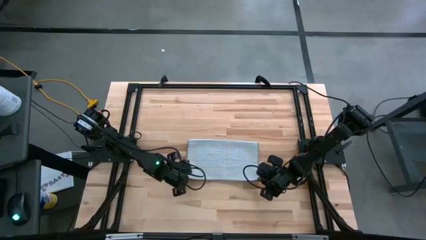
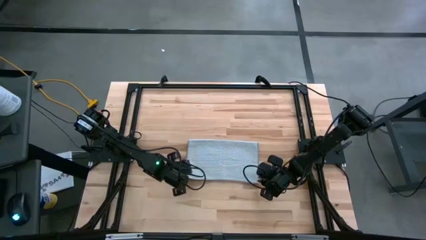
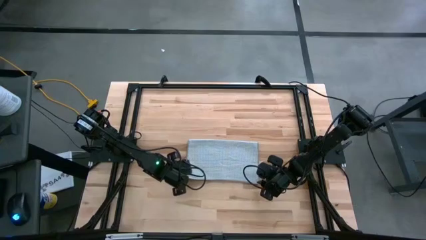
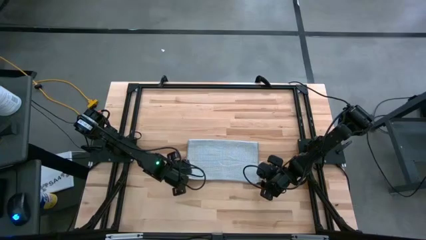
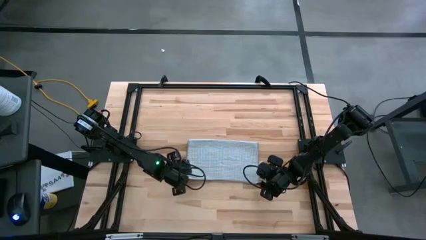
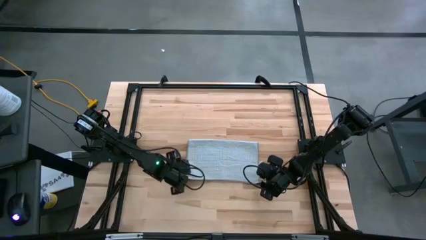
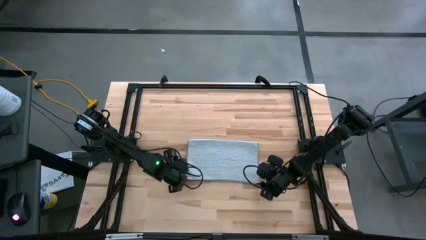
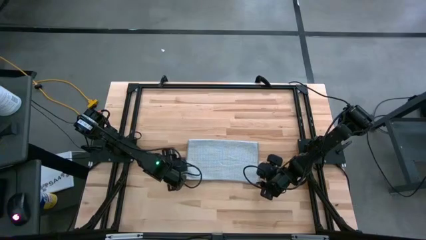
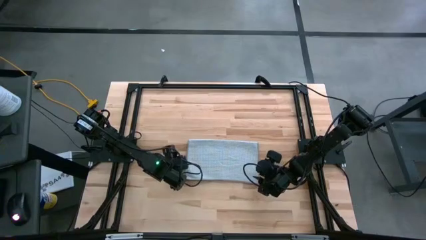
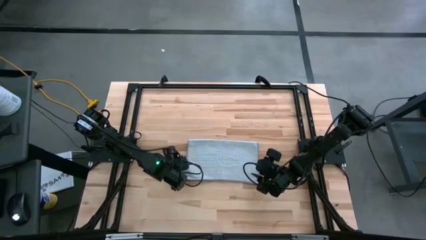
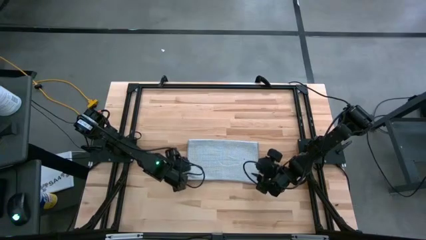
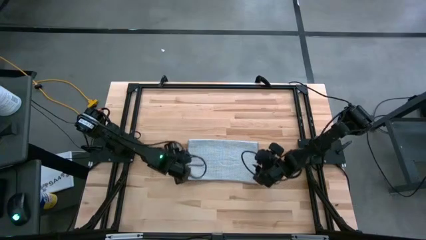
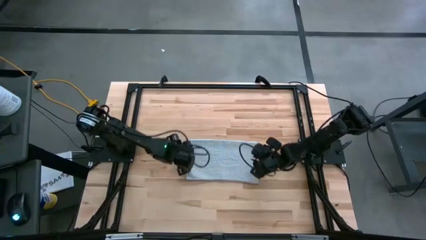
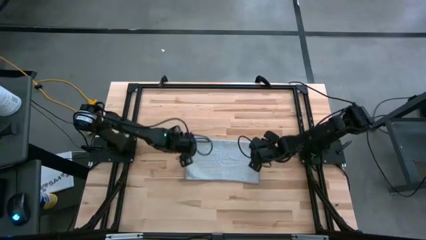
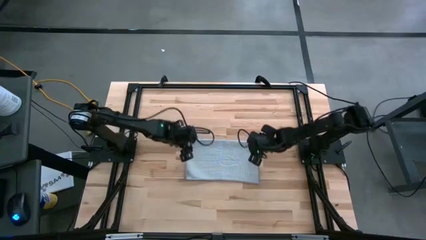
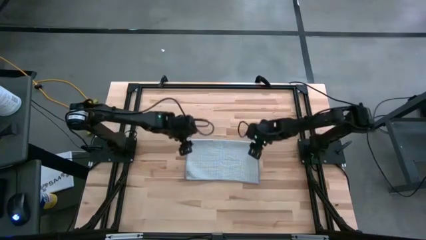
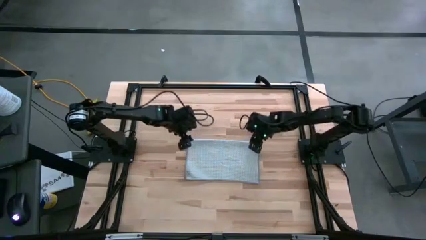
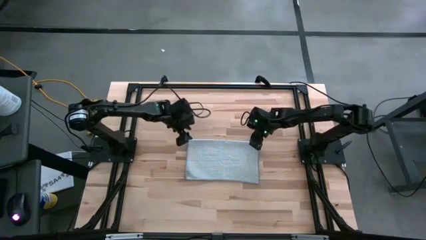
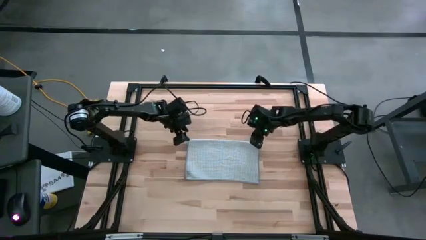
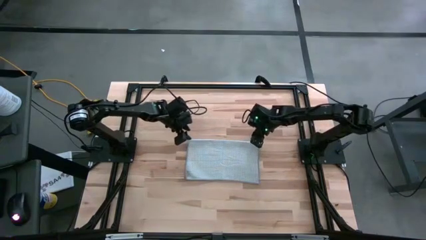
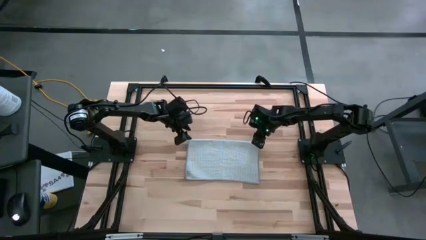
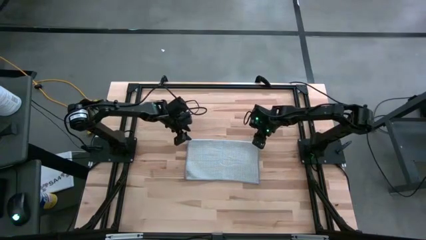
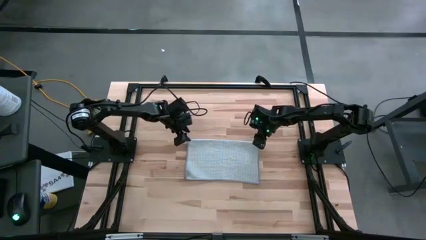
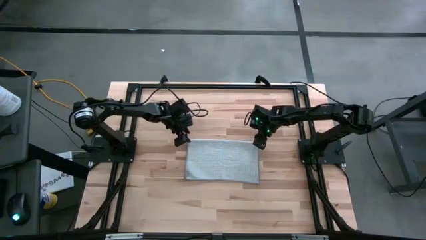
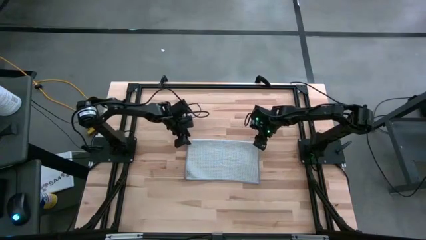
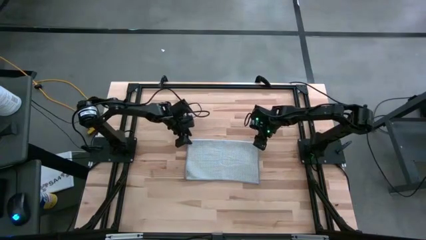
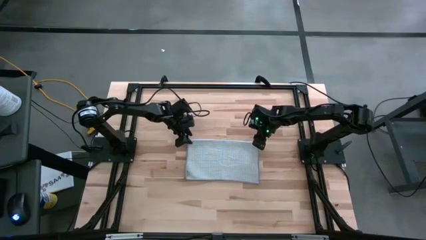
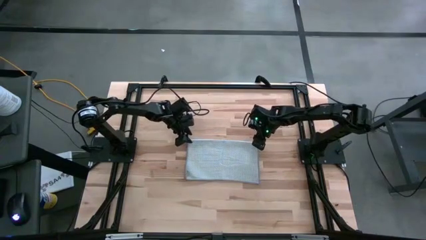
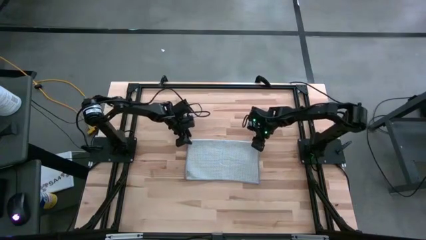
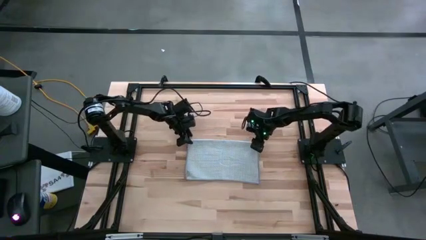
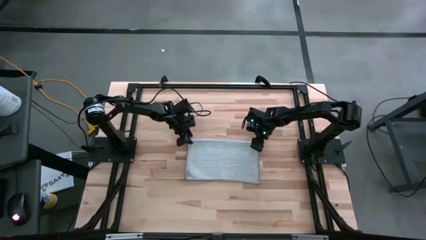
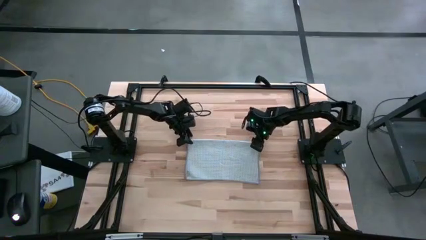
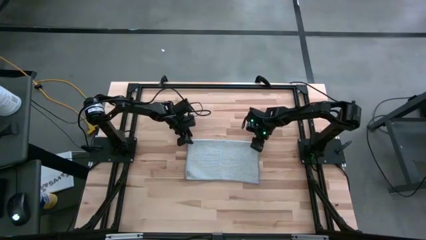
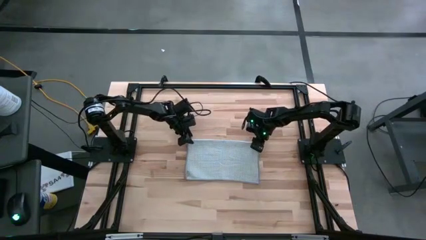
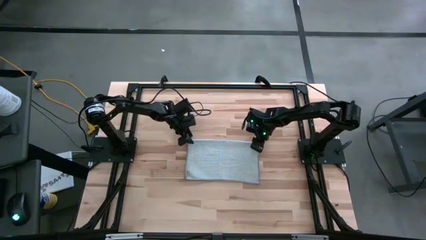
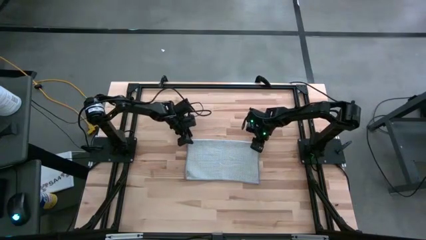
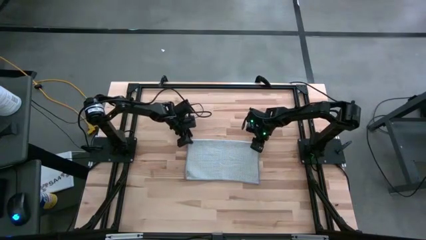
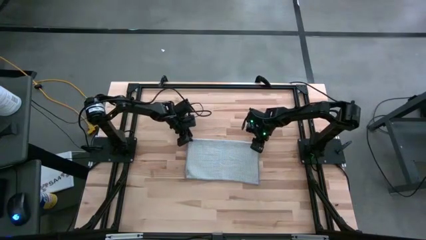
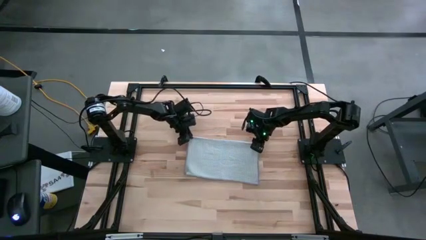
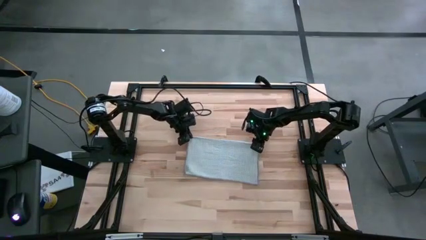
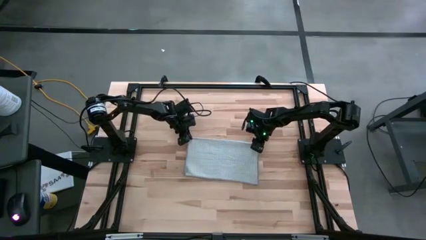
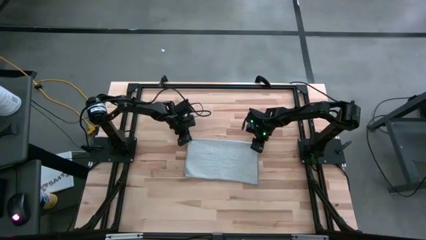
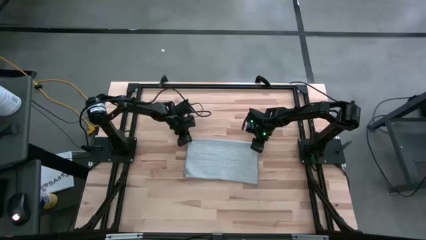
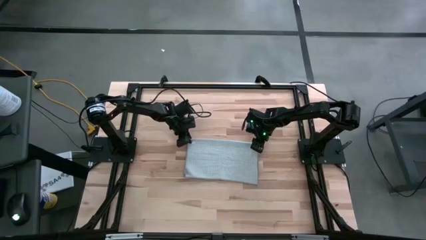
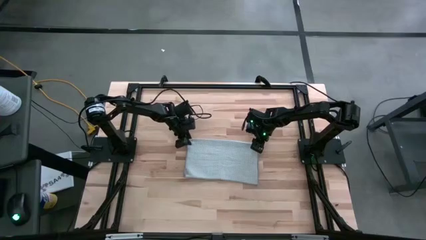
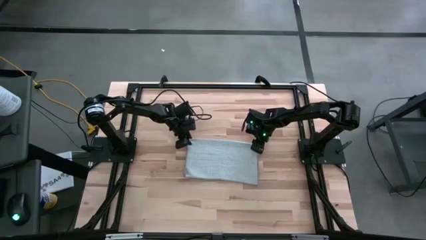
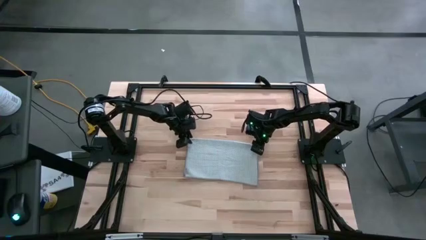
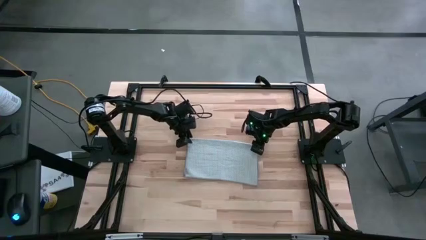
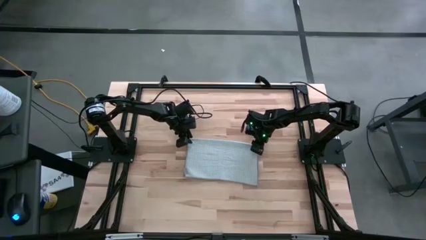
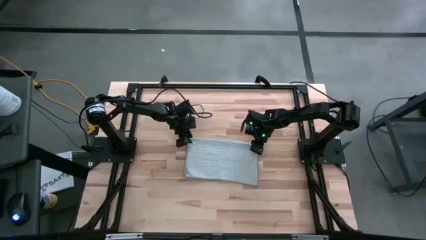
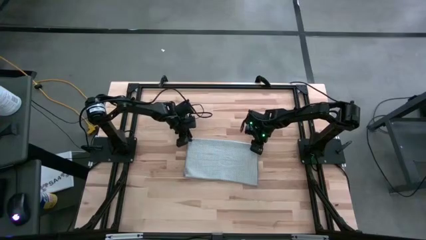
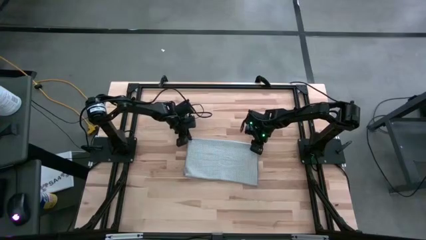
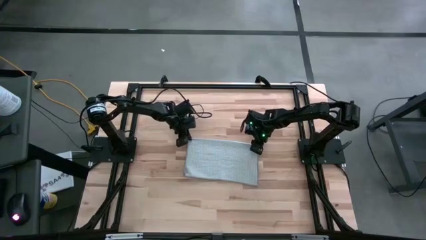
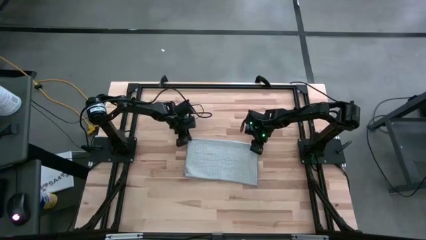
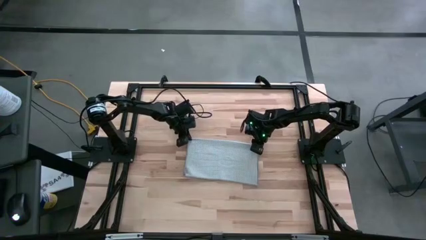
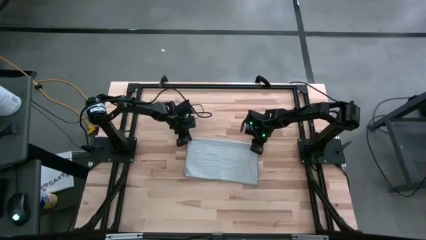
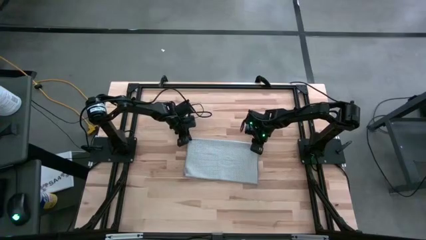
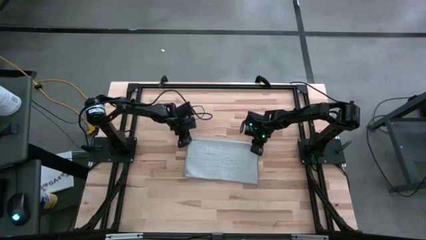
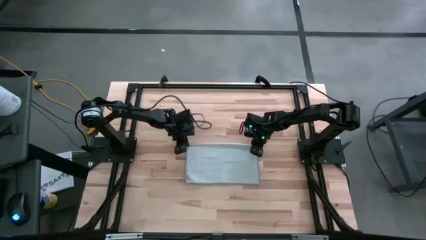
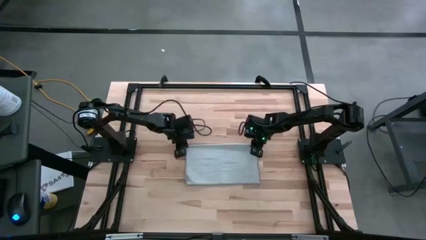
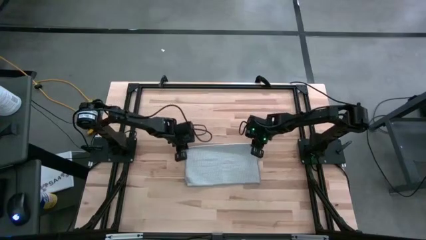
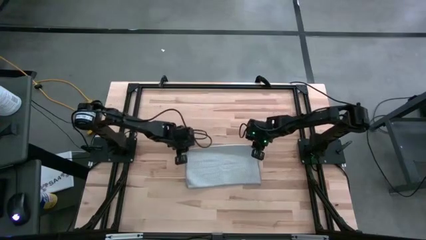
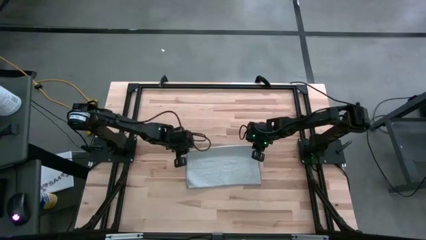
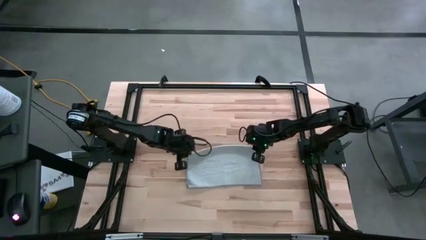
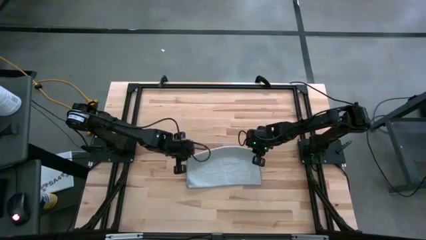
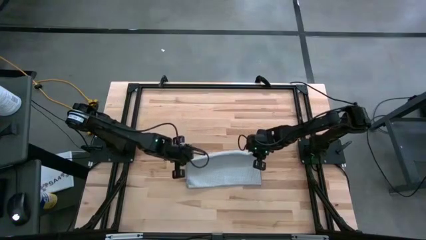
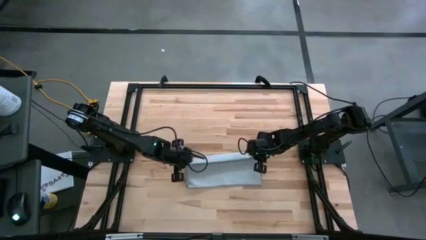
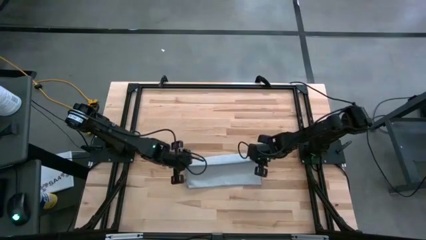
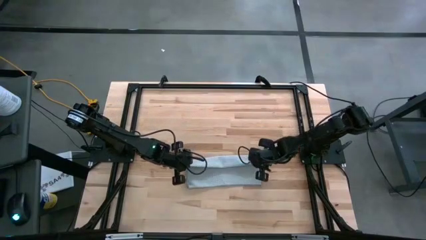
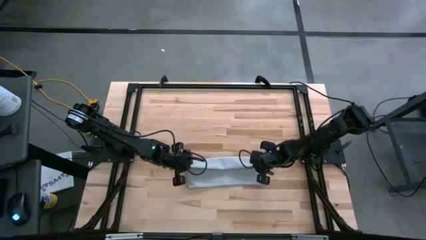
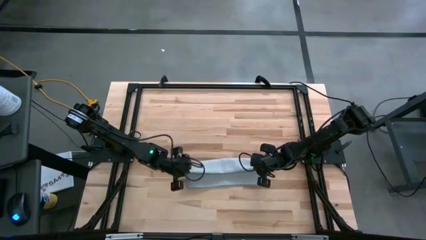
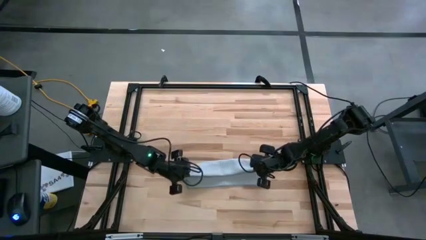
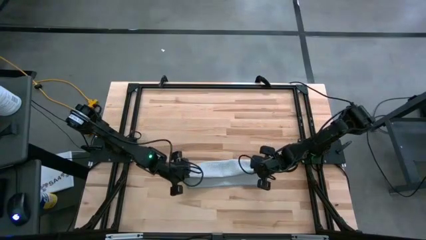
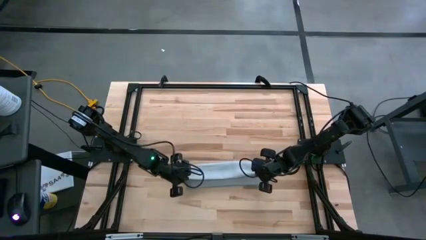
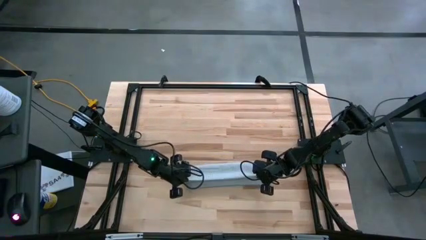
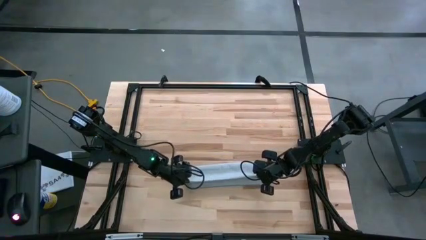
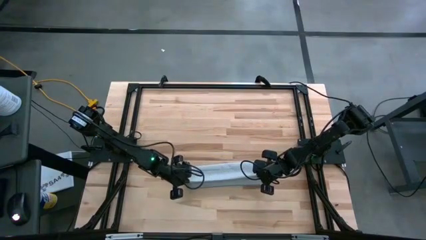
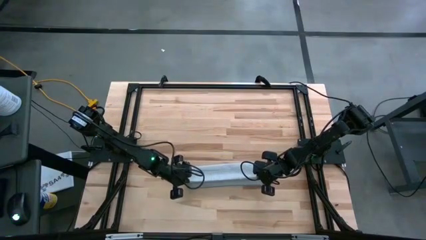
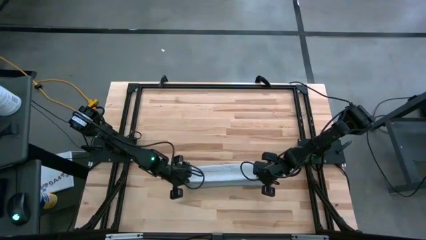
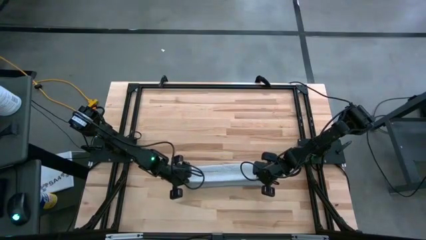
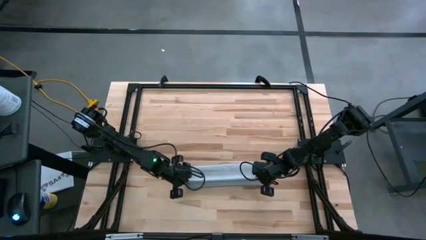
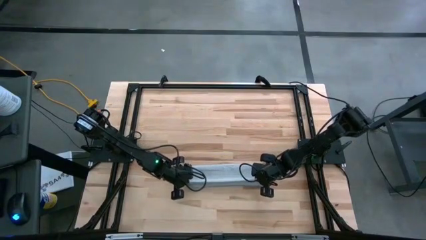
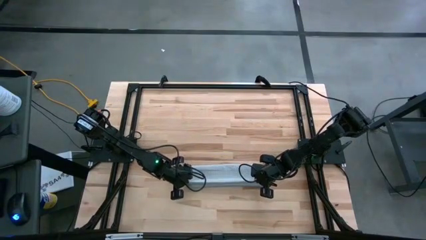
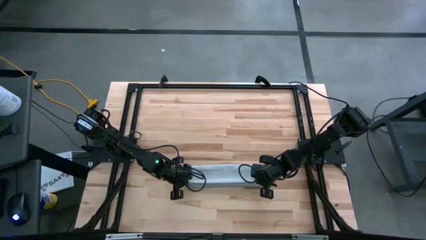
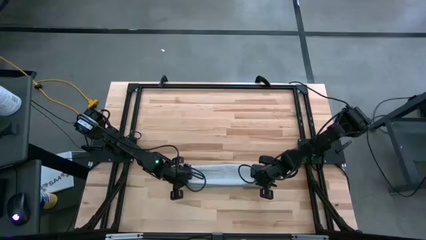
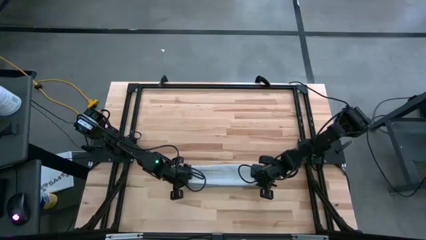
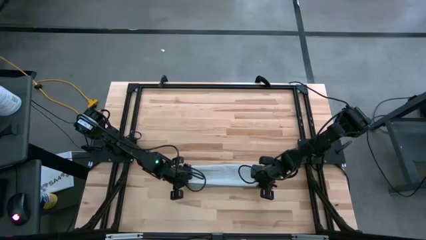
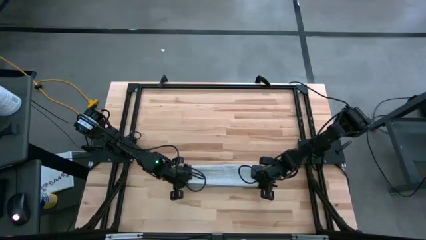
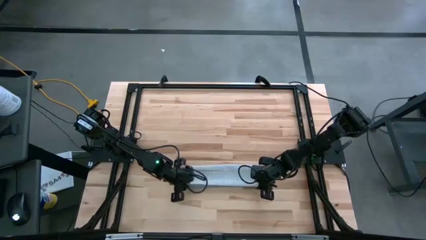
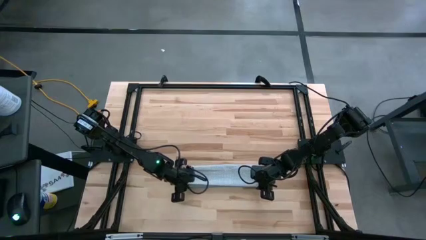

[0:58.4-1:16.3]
Task: Fold microfiber towels
Fold the gray towel on the table
